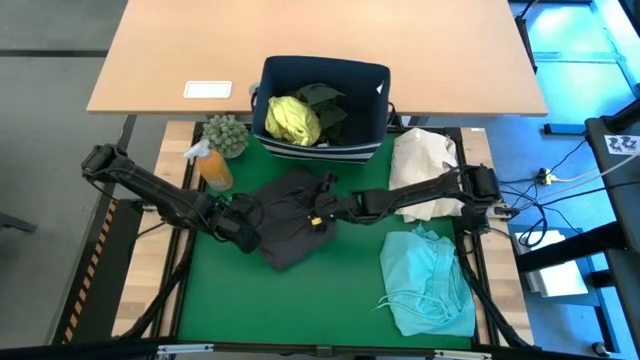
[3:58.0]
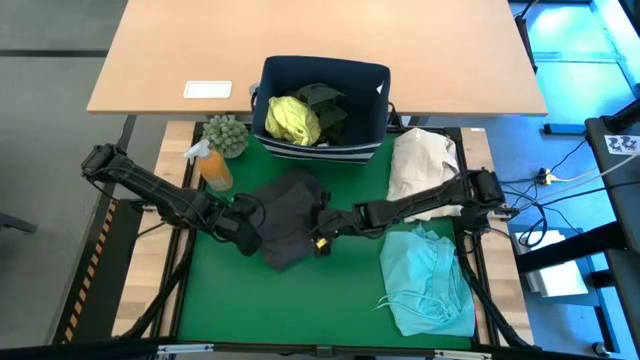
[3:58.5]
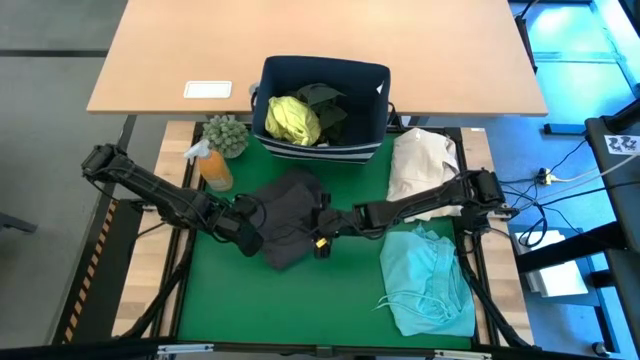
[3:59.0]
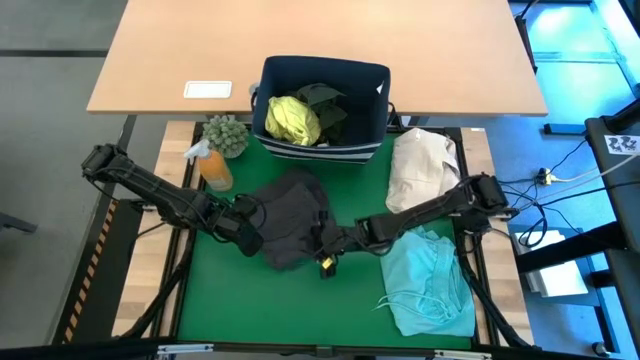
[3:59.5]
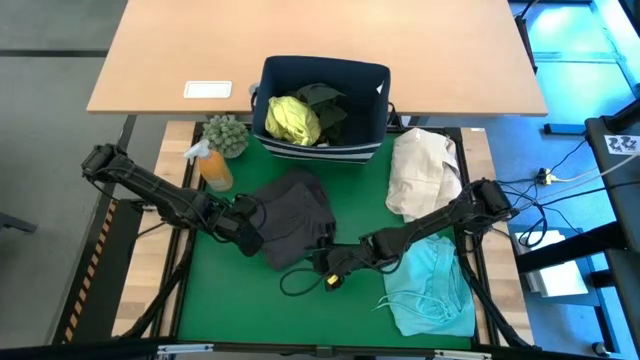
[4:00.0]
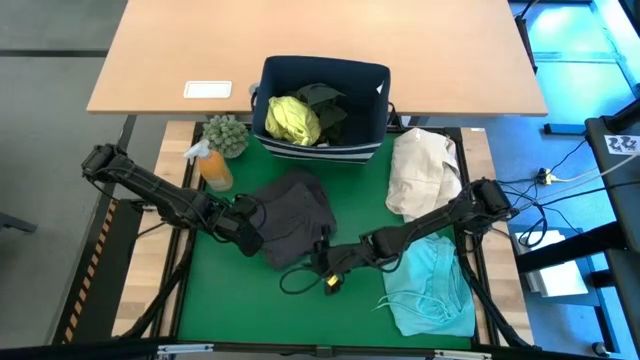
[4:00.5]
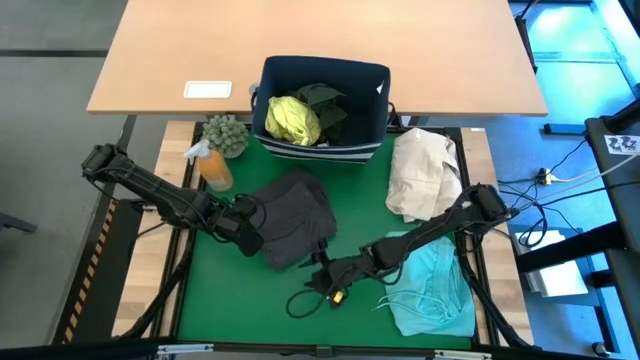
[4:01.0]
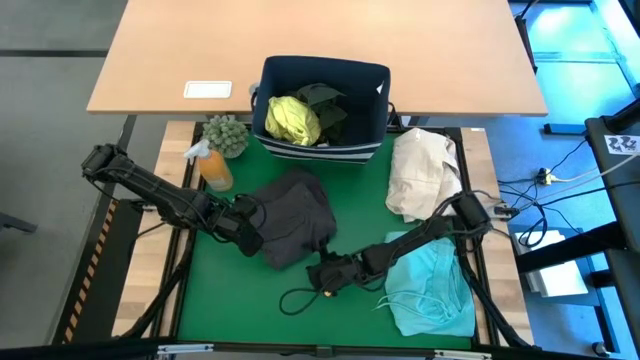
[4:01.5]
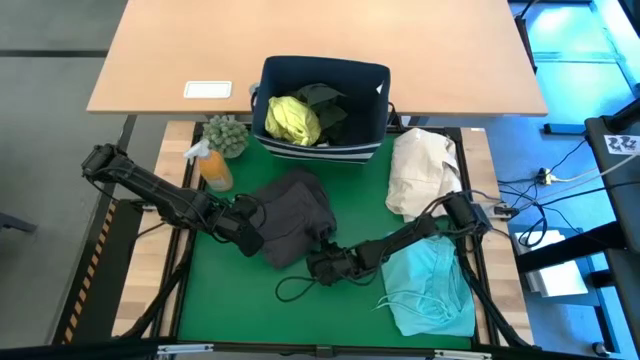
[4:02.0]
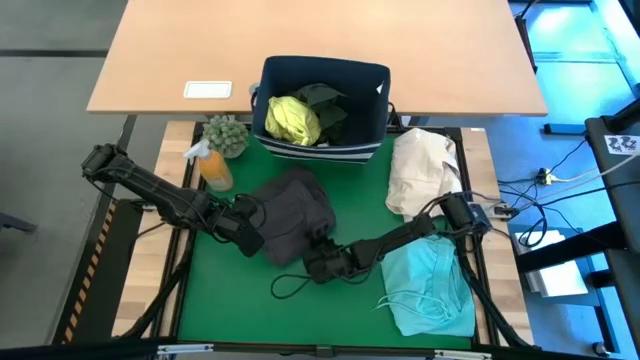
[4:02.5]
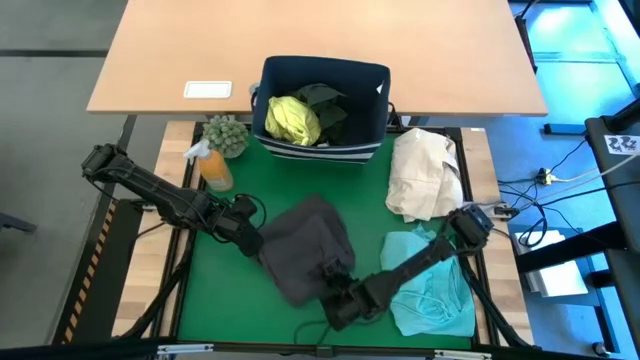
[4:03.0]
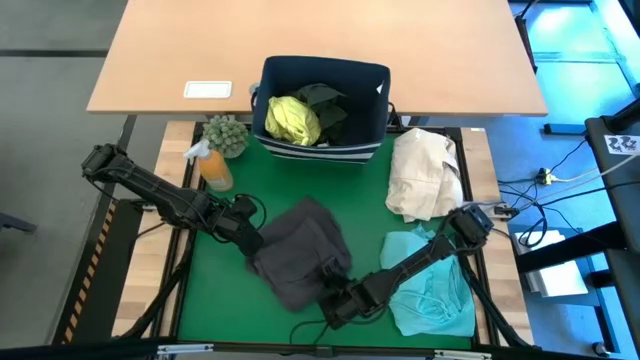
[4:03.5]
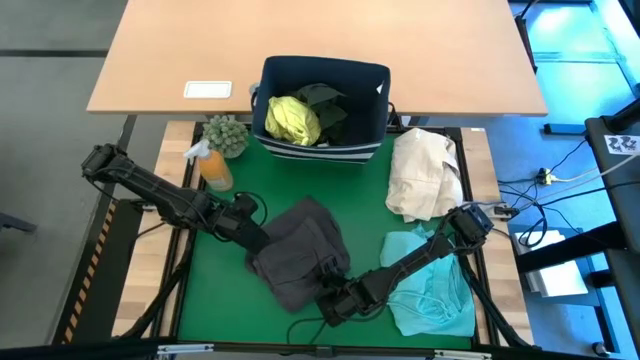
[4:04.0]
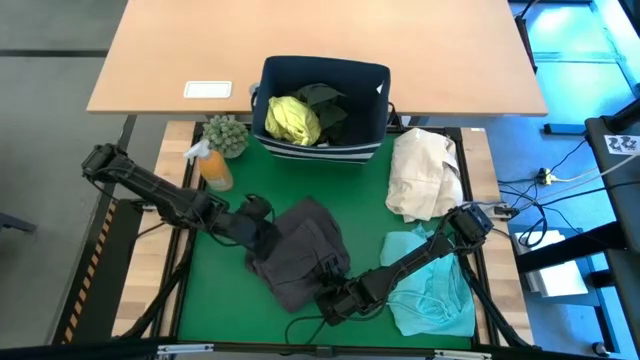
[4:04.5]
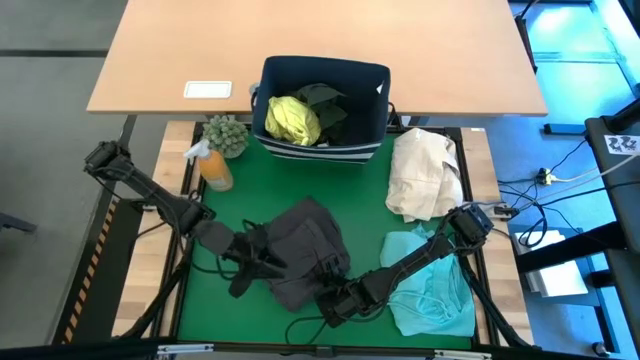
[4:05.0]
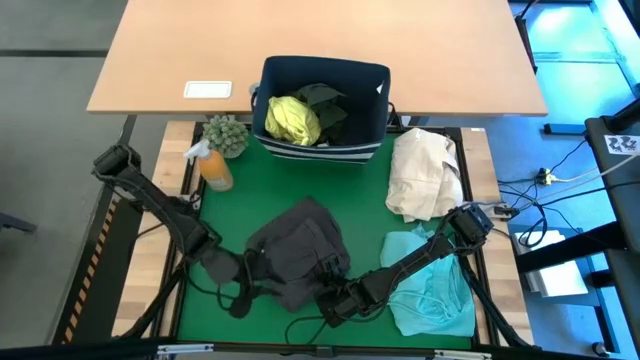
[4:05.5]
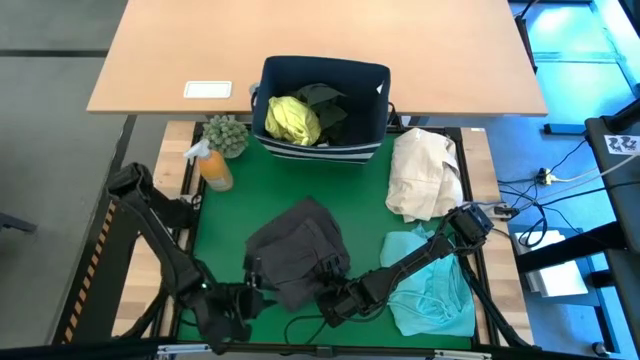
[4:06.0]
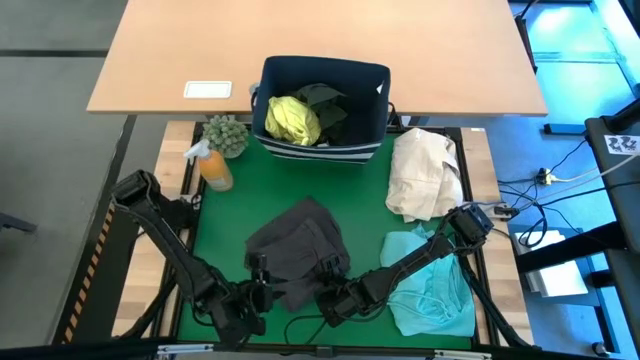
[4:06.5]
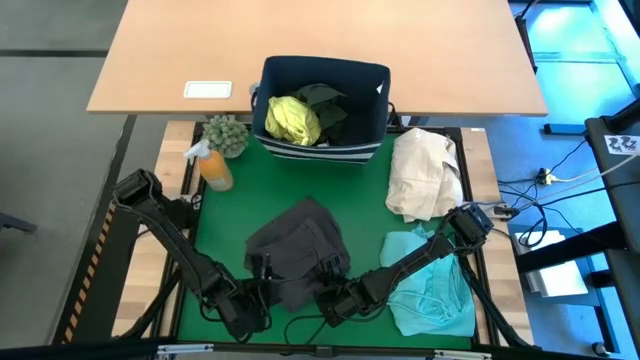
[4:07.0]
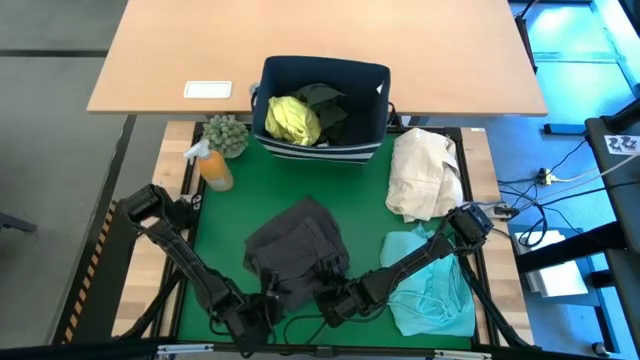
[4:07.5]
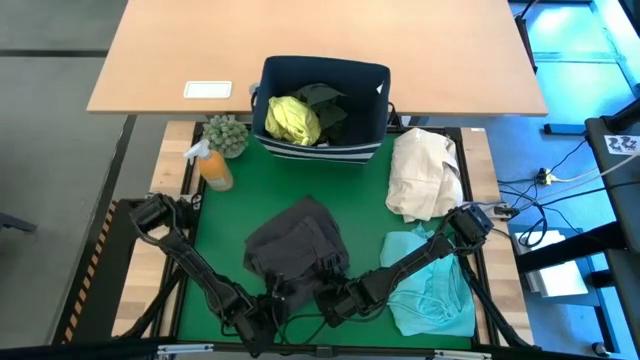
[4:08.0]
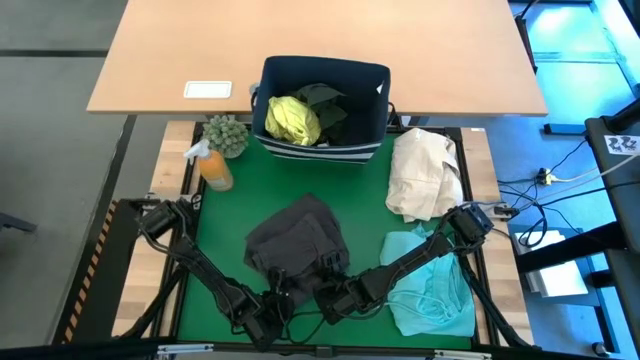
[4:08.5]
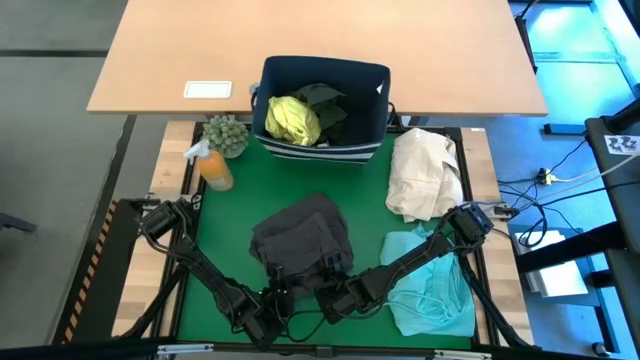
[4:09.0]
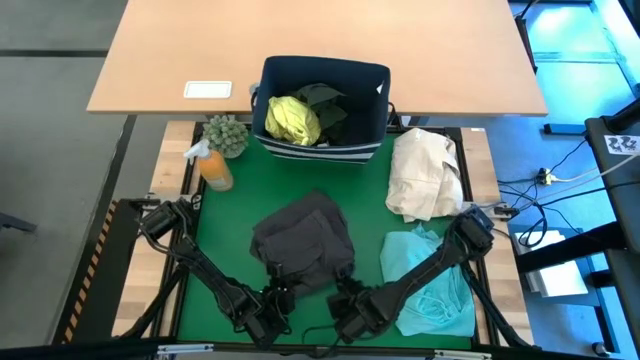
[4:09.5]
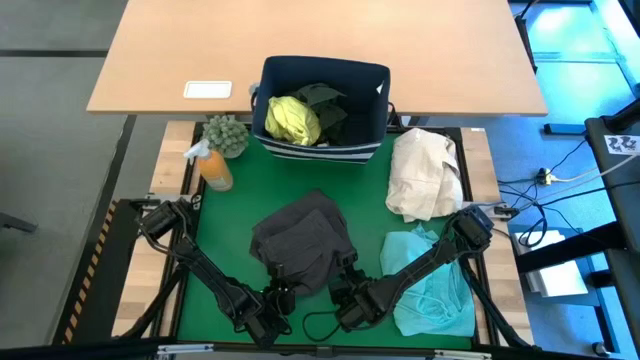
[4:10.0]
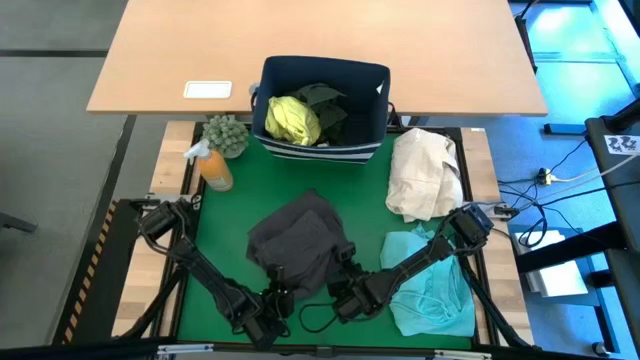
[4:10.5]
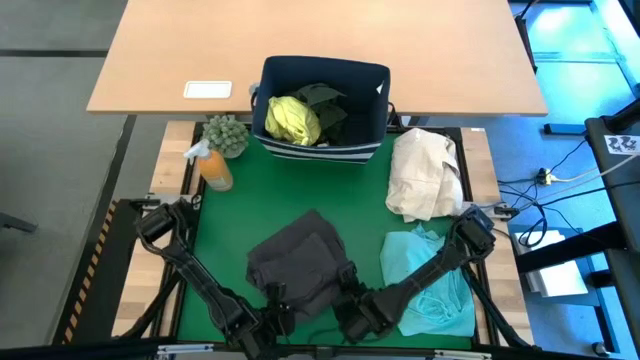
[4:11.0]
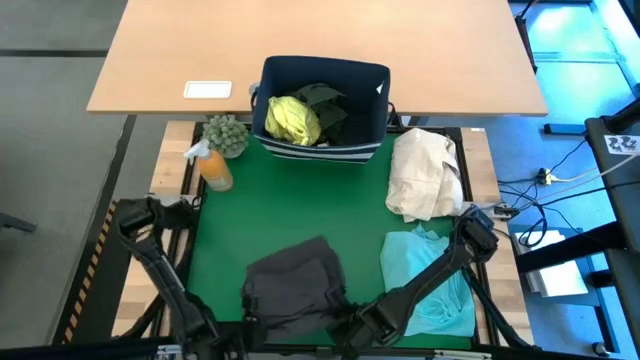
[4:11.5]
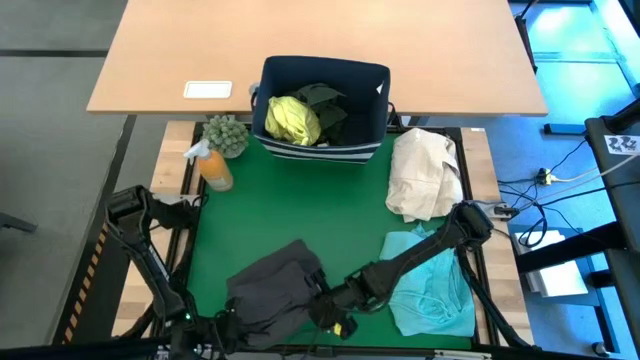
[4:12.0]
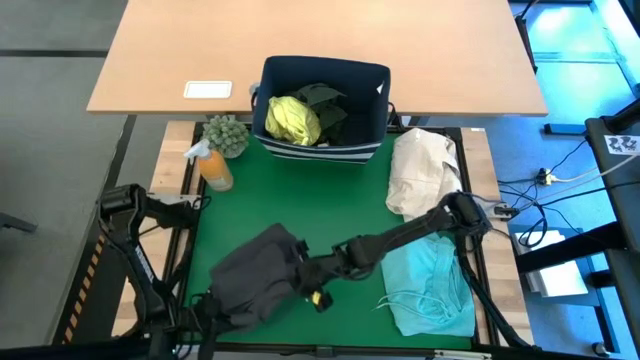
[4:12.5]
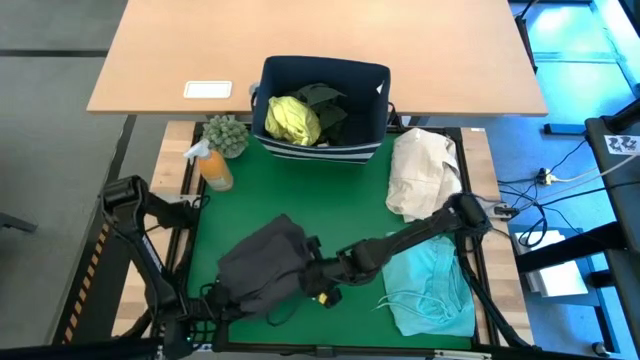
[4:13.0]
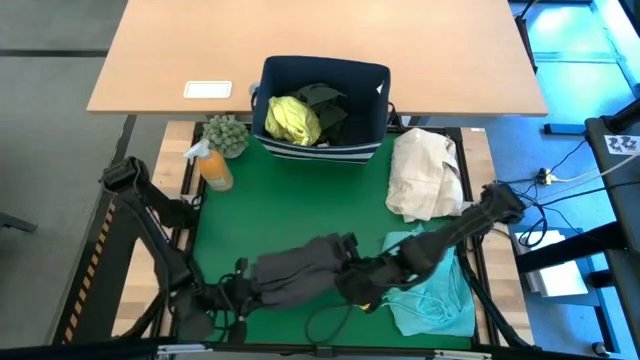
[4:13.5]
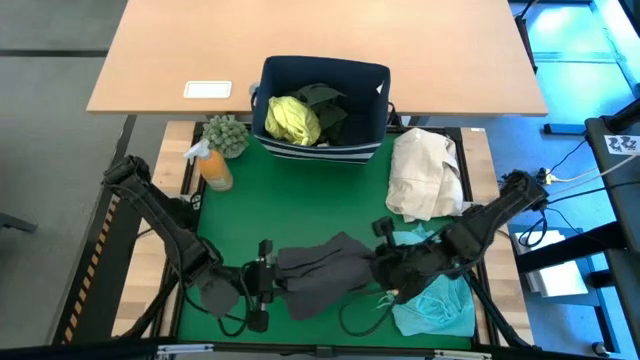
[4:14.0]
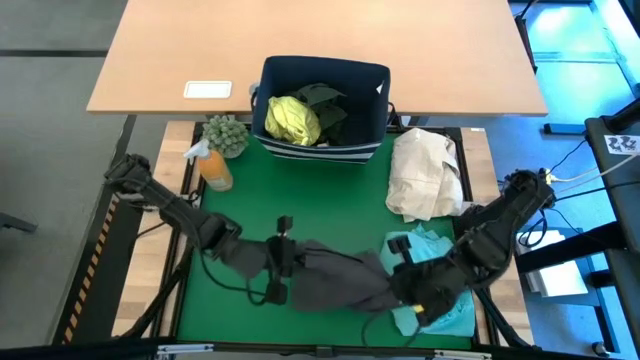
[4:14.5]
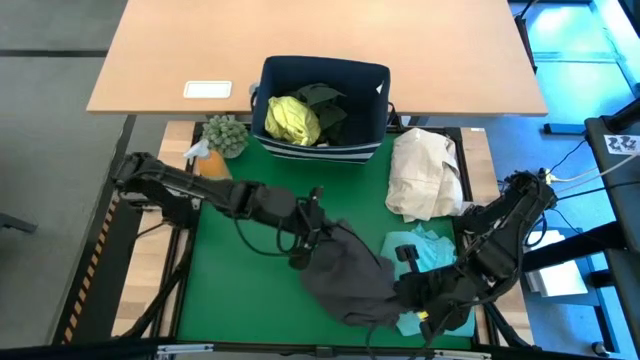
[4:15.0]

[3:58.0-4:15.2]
Task: Fold laundry
Stack the black shorts on the blue shorts
